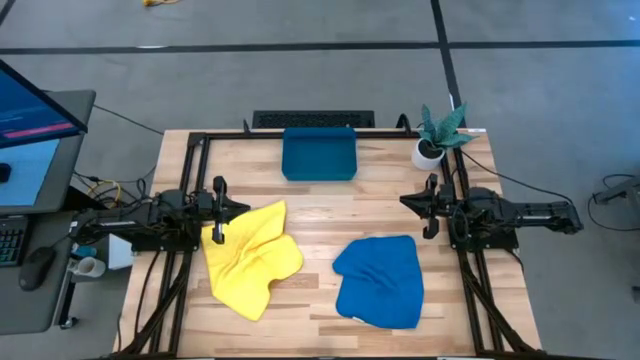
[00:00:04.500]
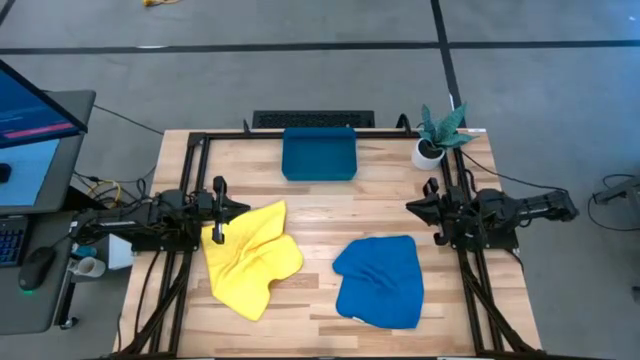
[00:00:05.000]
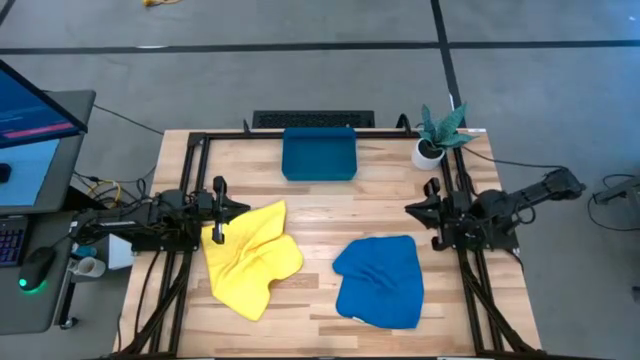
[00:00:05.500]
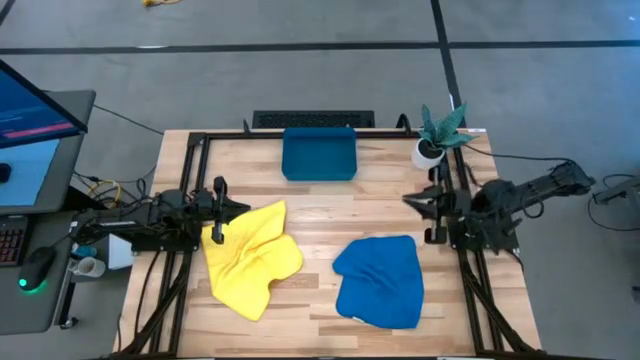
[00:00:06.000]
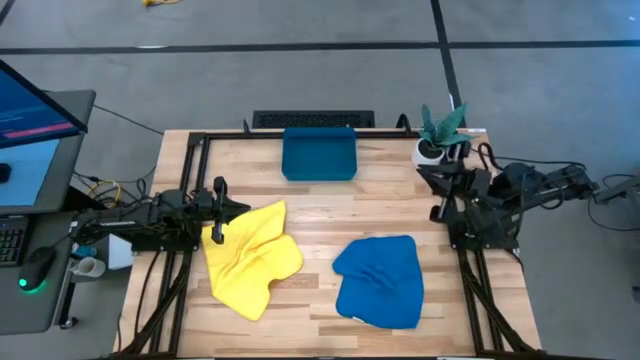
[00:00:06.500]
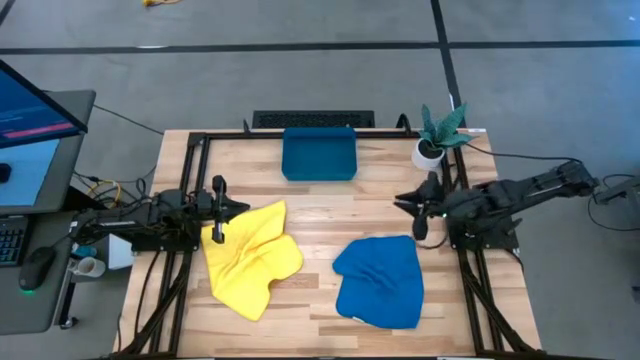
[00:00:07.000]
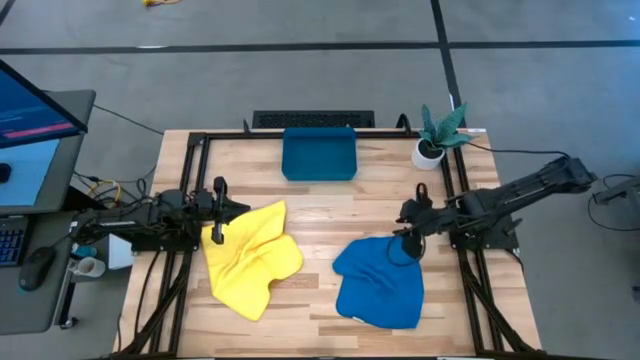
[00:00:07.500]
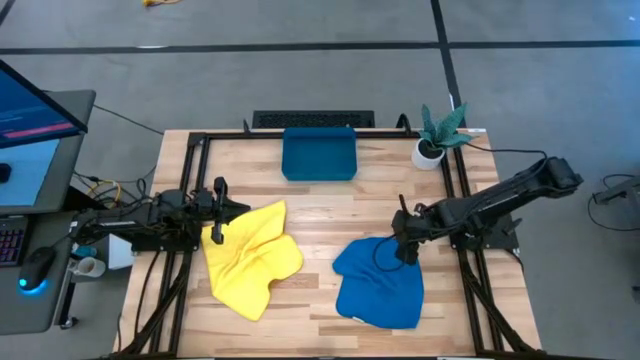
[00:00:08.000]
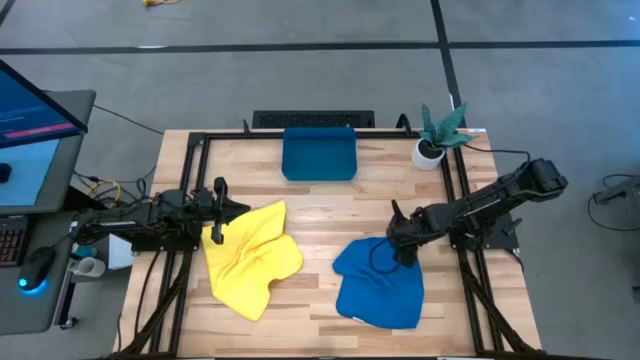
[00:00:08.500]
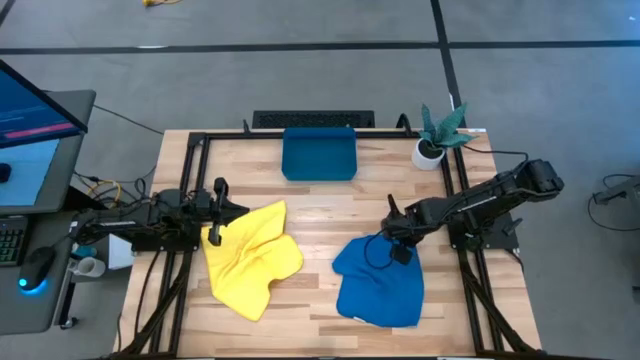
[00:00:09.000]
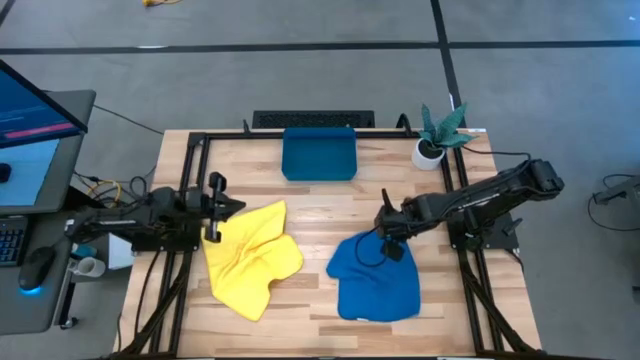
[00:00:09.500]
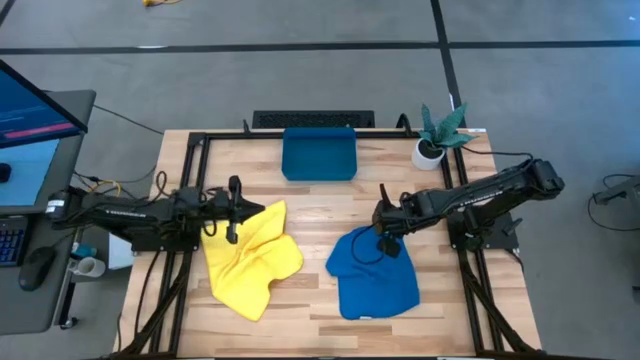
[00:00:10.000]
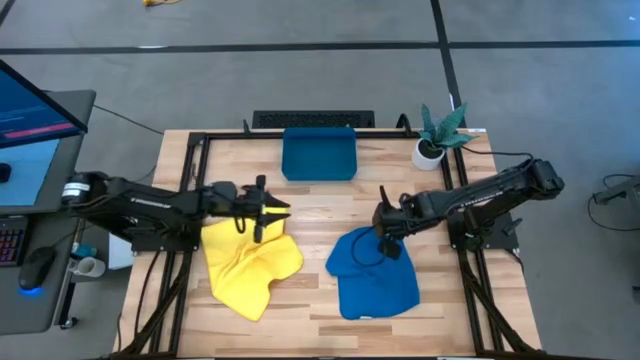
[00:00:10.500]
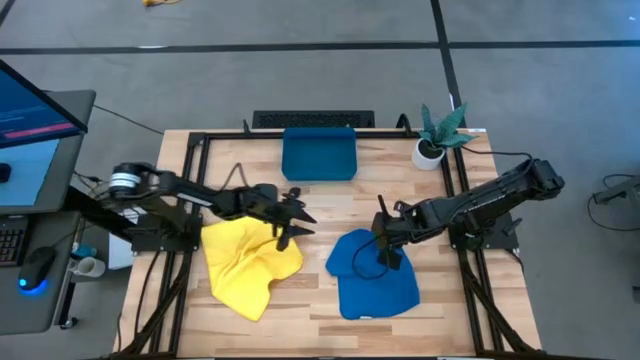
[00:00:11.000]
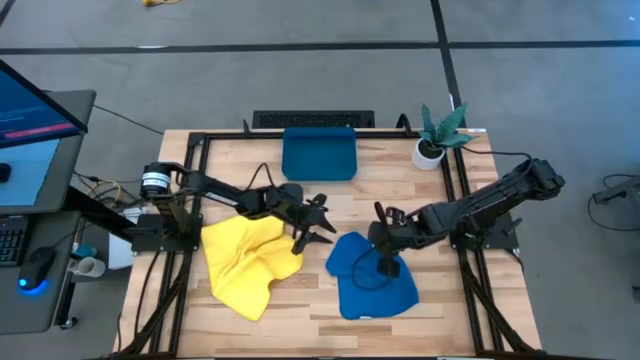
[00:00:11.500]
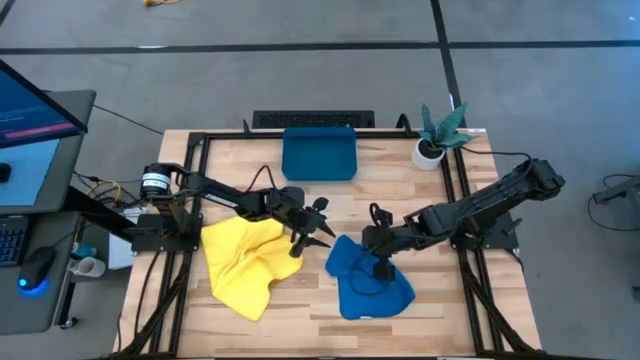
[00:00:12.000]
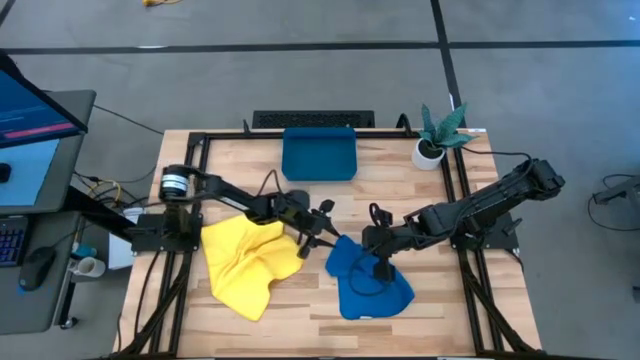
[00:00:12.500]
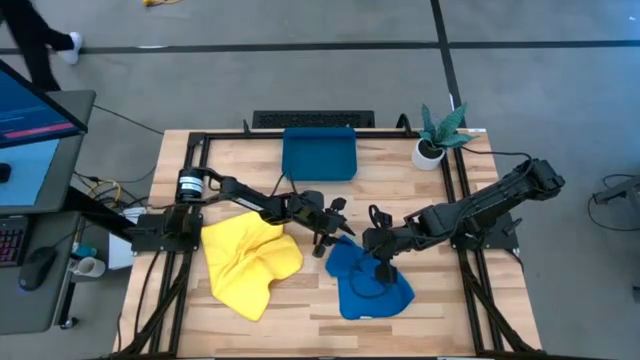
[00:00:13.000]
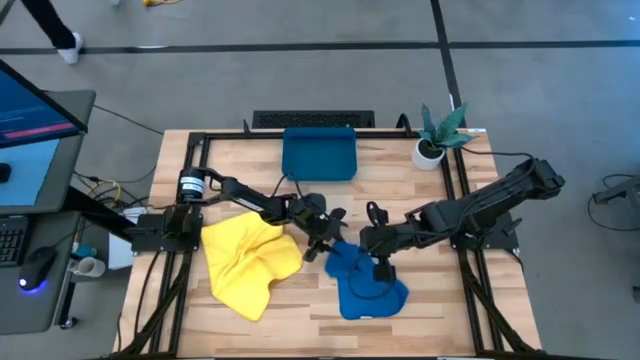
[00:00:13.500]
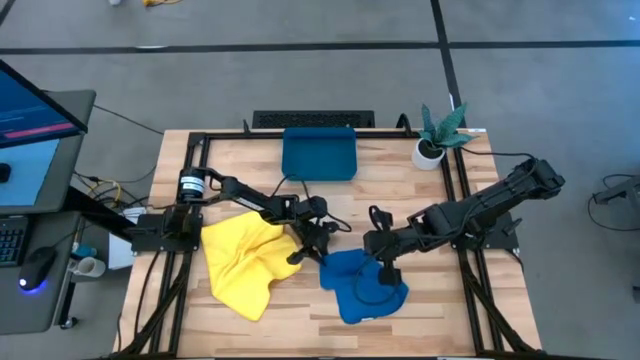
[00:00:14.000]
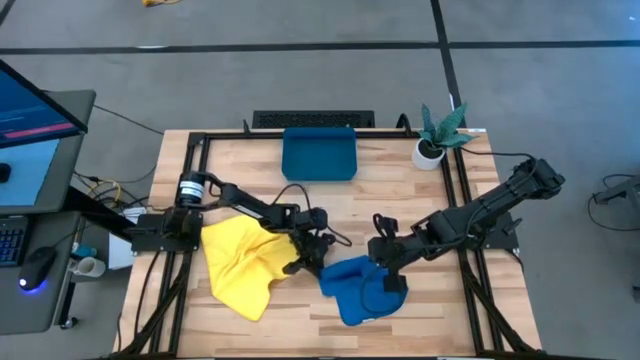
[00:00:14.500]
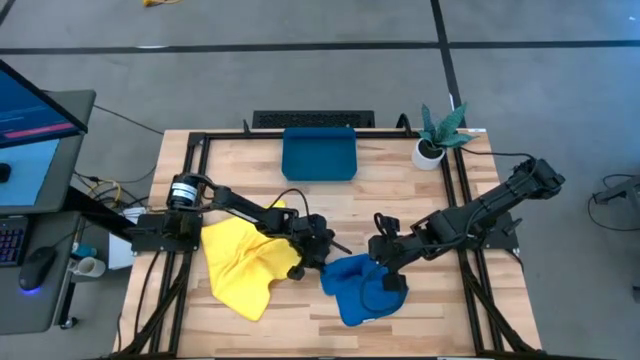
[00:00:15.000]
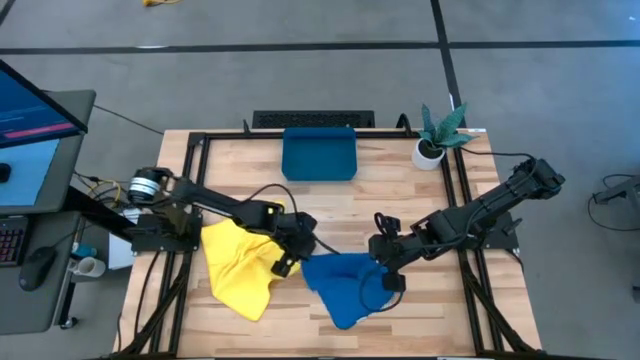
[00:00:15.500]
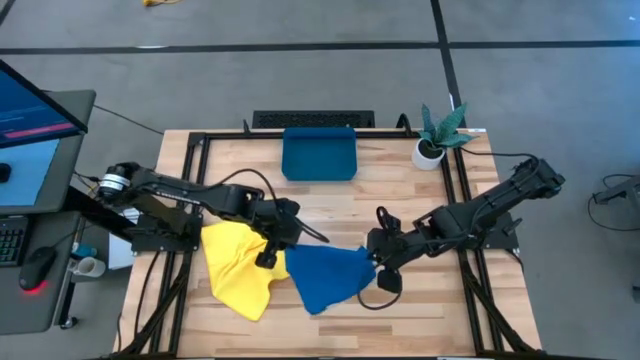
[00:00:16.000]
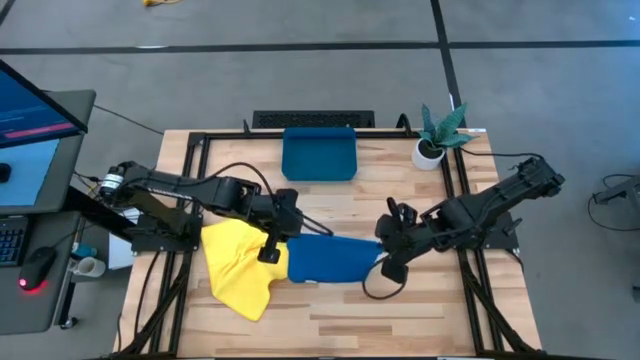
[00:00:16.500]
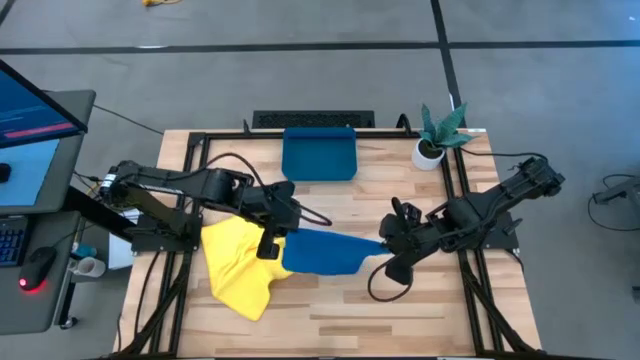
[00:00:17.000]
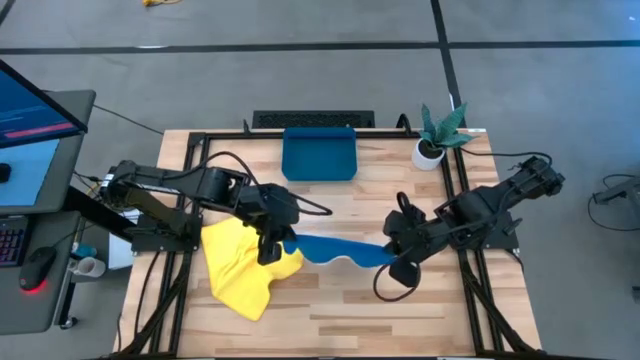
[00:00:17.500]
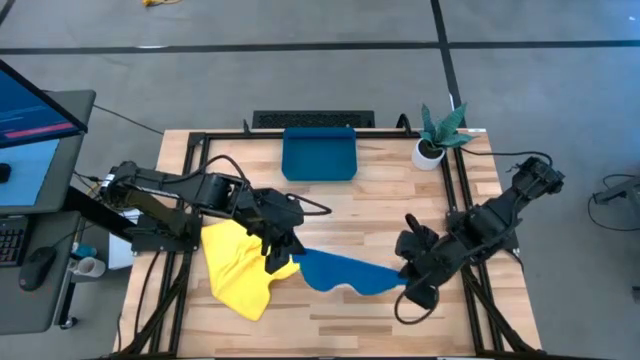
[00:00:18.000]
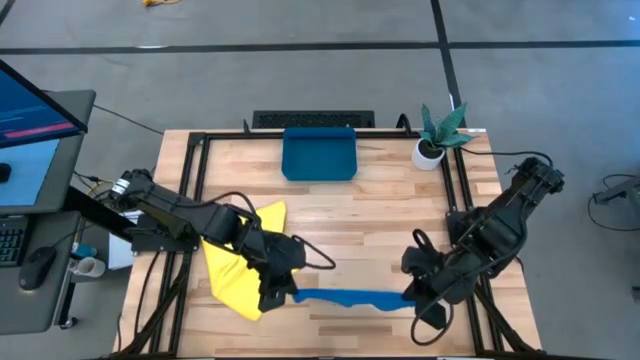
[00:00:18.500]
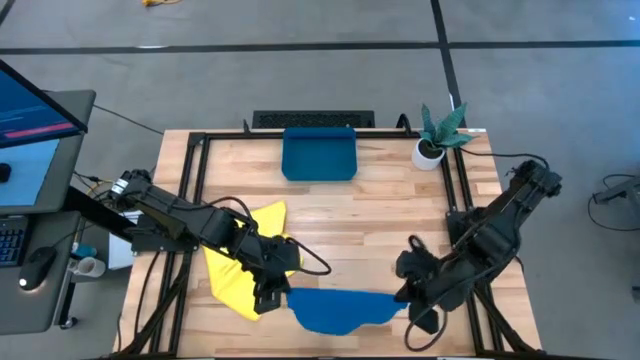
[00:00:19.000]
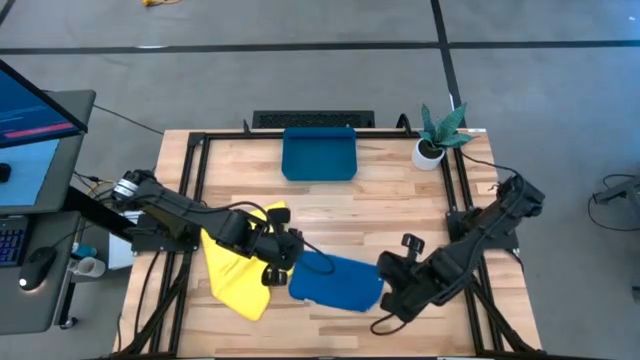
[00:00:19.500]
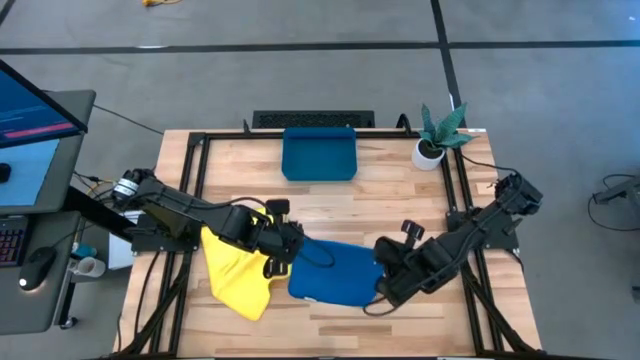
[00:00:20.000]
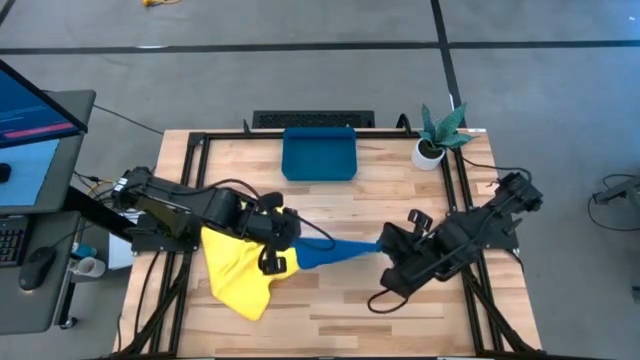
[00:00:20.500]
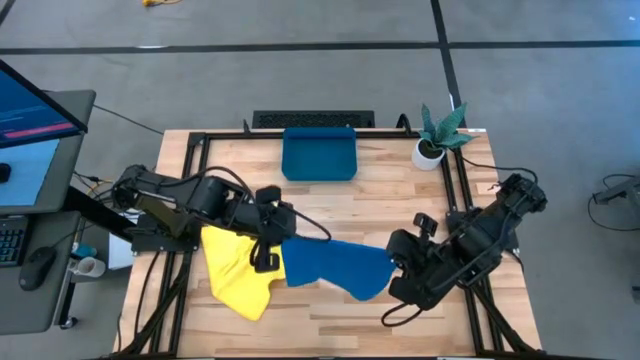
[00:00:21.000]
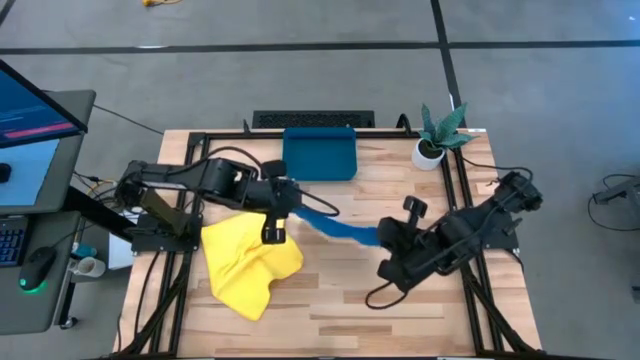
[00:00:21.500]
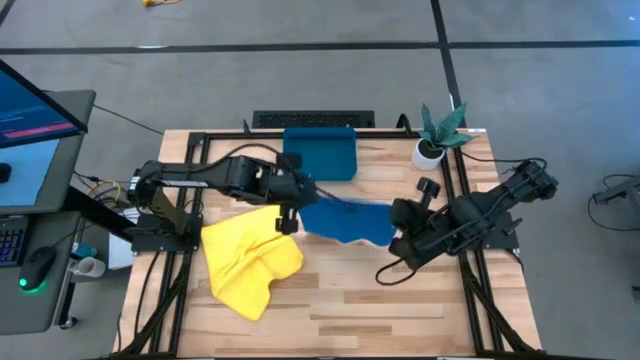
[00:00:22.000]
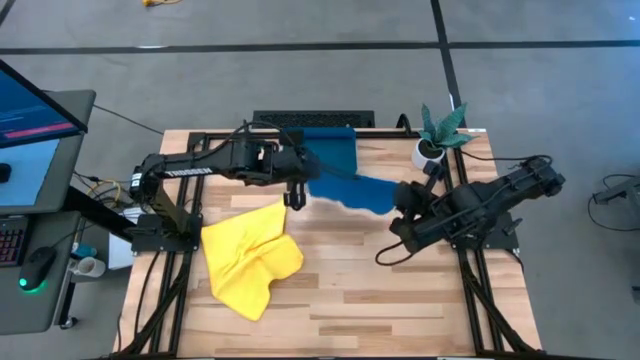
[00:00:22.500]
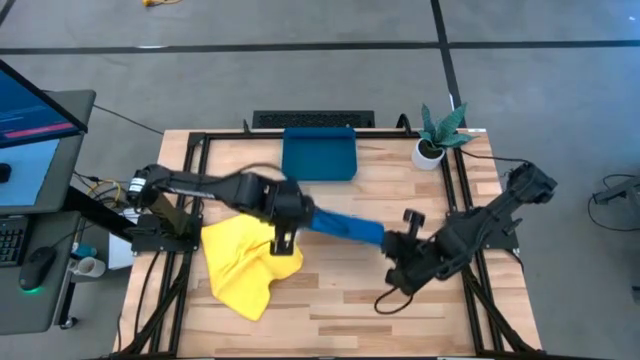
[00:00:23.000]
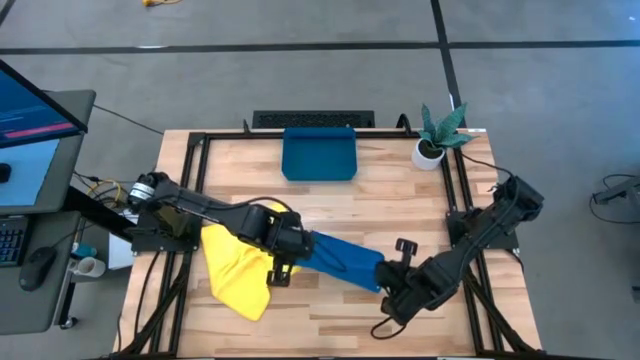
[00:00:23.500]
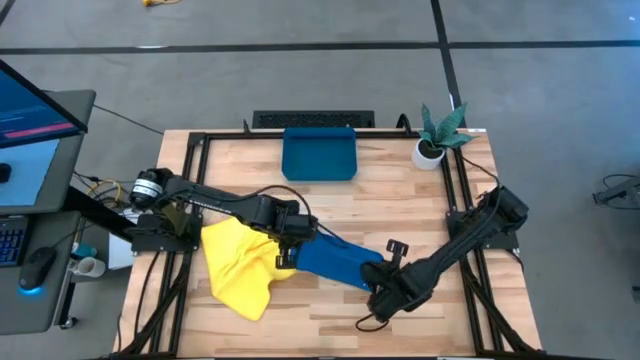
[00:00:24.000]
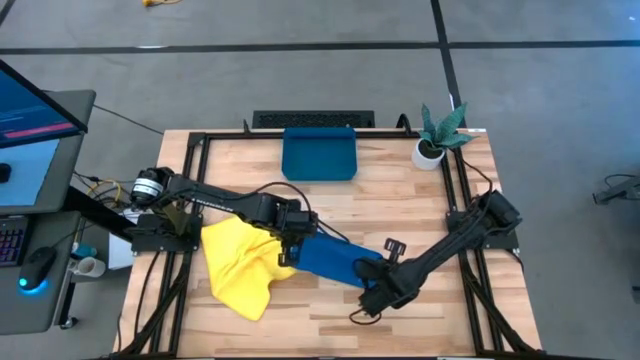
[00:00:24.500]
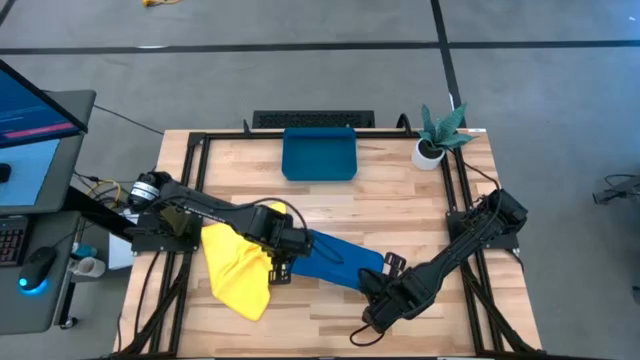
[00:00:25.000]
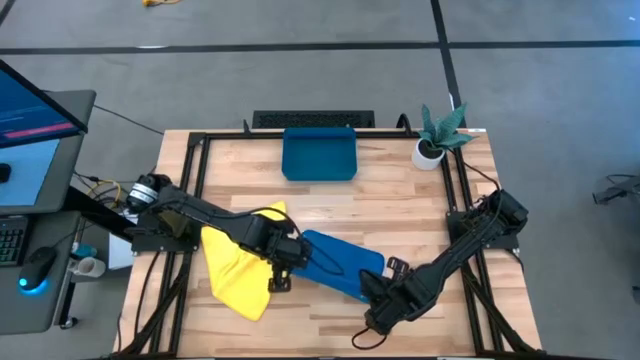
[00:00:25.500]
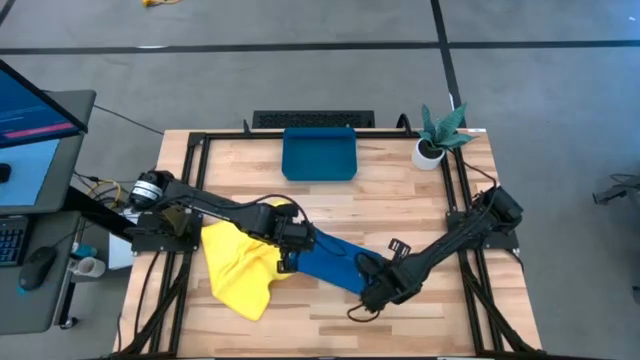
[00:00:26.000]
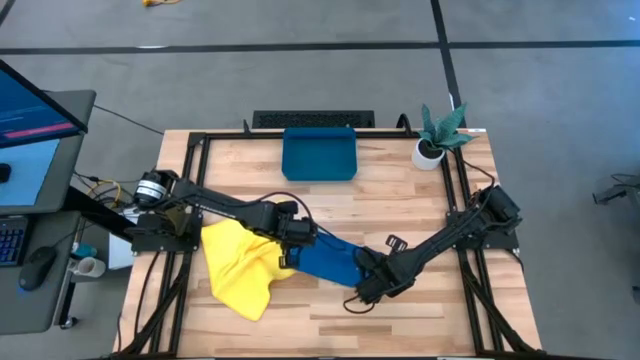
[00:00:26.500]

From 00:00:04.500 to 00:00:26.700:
Task: Roll microfiber towels into tight, uniform cylinder then place into a basket
Roll the blue microfiber cloth
